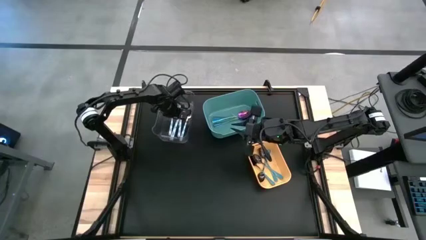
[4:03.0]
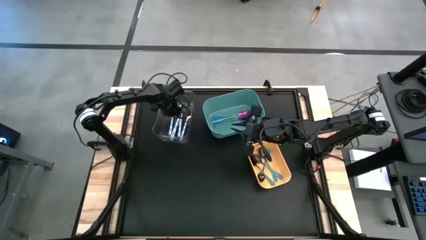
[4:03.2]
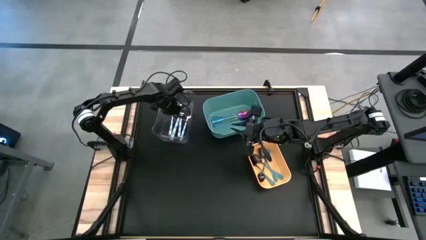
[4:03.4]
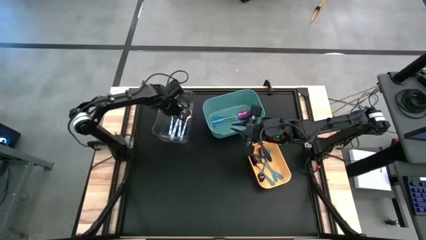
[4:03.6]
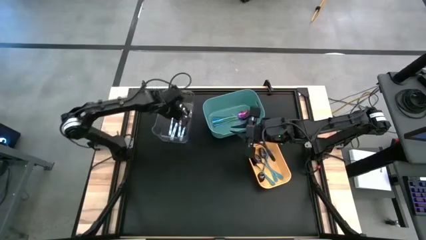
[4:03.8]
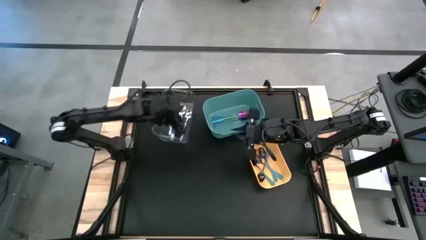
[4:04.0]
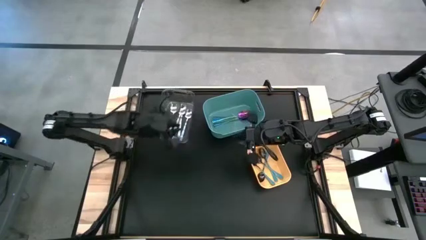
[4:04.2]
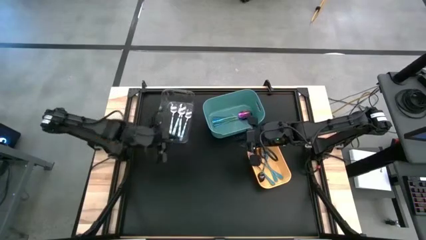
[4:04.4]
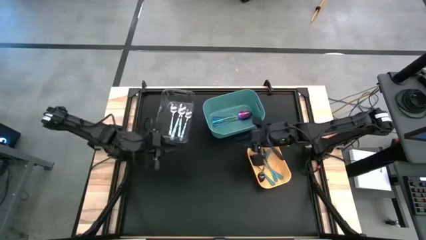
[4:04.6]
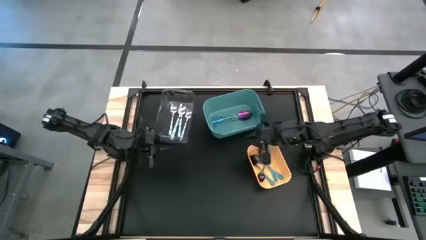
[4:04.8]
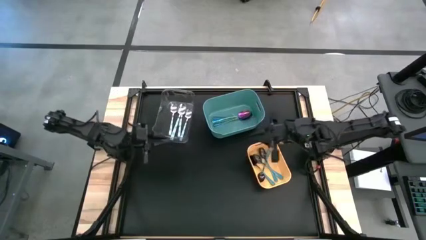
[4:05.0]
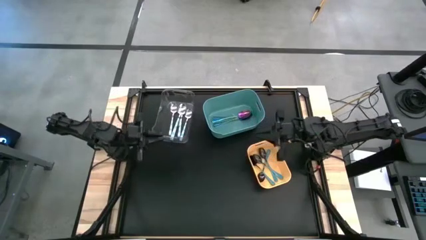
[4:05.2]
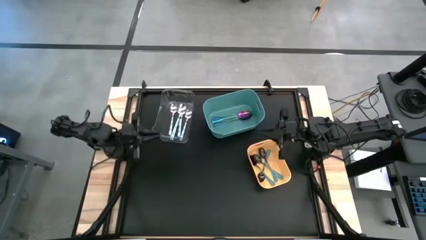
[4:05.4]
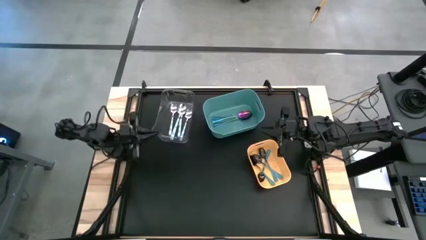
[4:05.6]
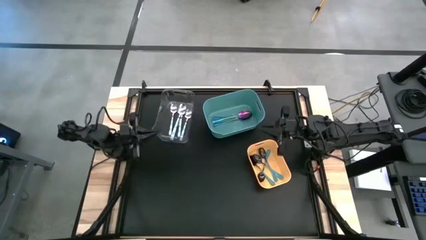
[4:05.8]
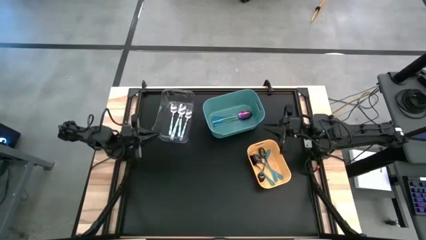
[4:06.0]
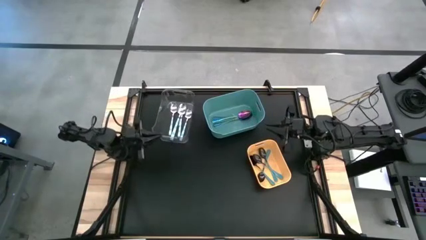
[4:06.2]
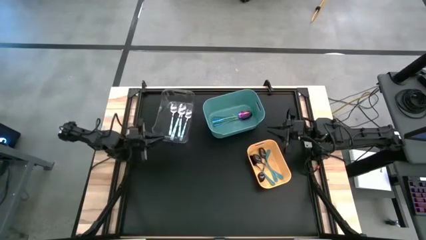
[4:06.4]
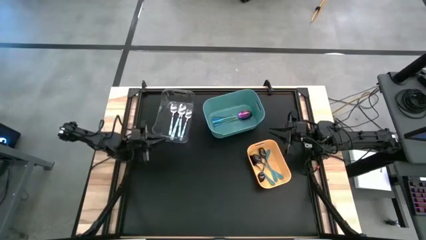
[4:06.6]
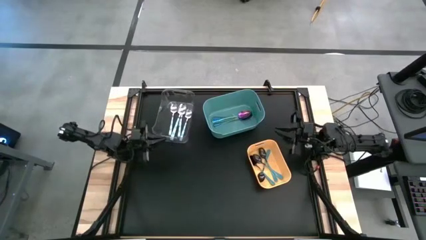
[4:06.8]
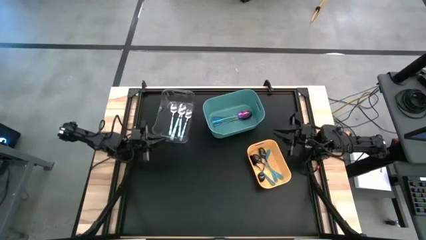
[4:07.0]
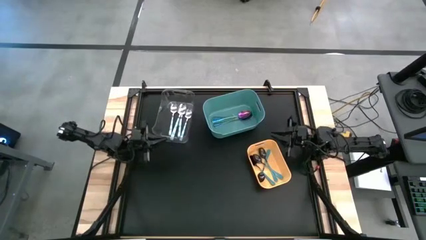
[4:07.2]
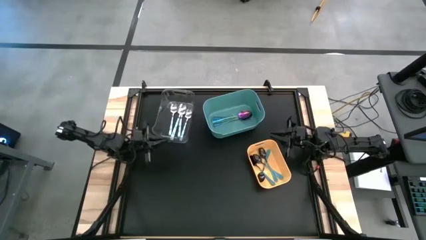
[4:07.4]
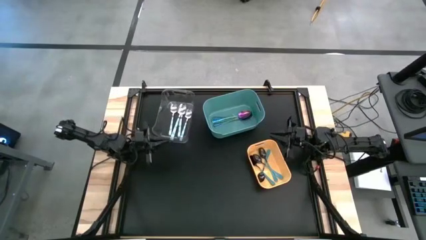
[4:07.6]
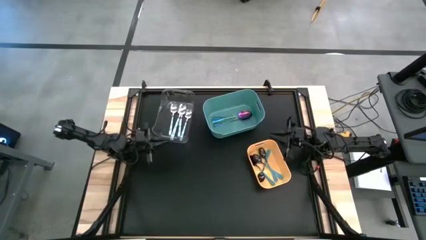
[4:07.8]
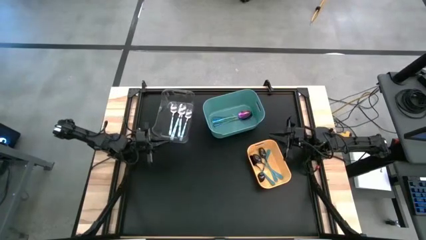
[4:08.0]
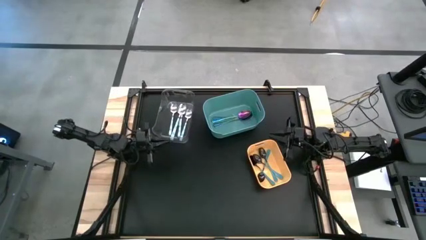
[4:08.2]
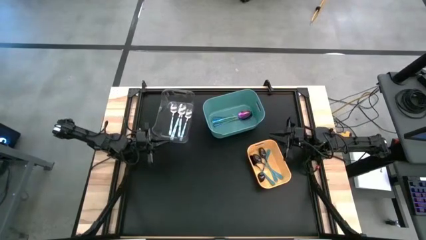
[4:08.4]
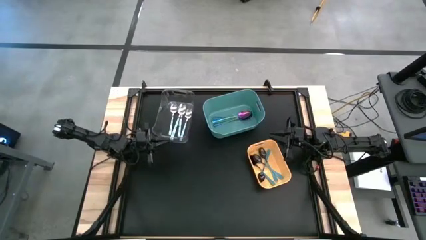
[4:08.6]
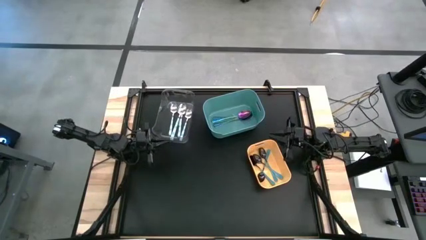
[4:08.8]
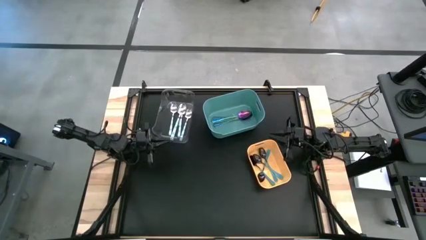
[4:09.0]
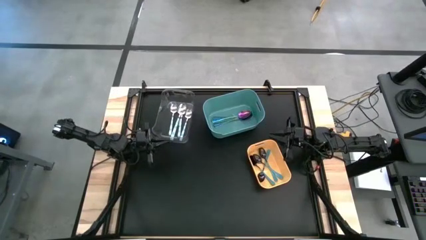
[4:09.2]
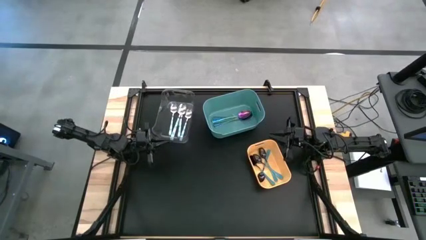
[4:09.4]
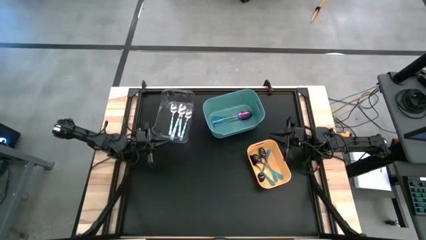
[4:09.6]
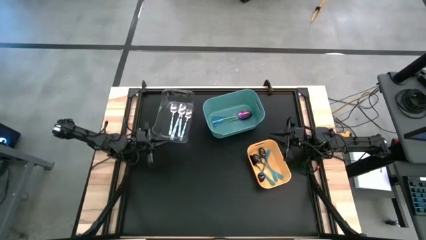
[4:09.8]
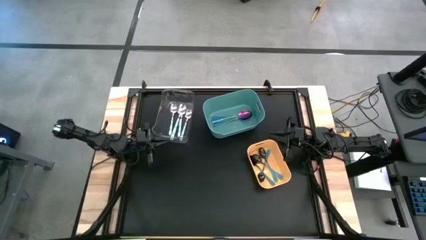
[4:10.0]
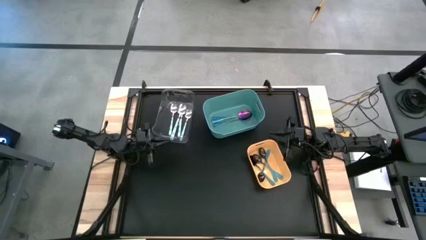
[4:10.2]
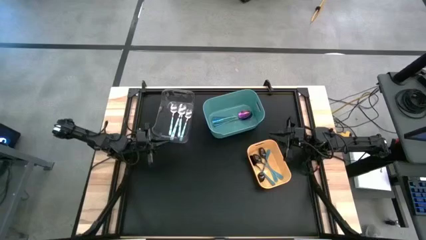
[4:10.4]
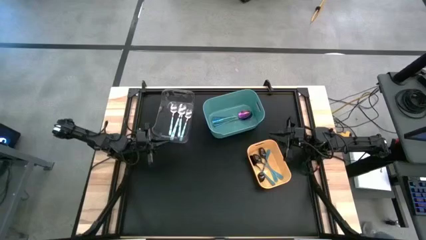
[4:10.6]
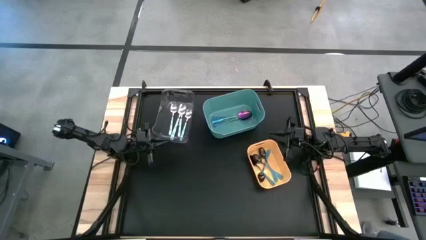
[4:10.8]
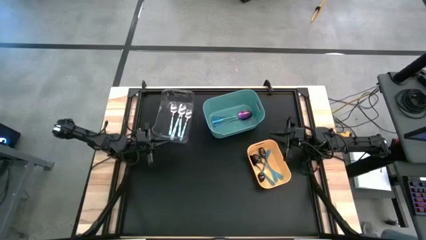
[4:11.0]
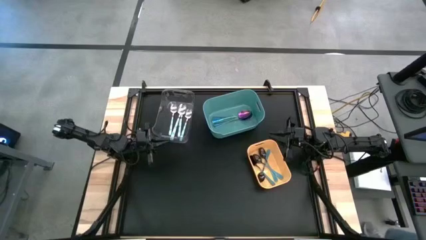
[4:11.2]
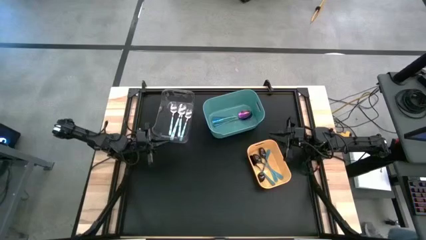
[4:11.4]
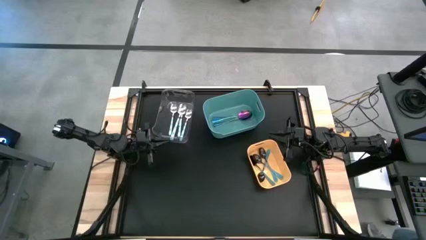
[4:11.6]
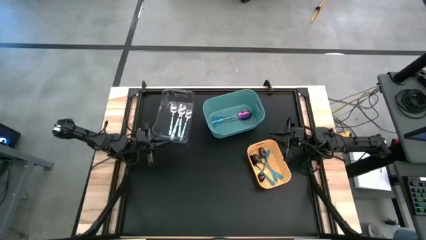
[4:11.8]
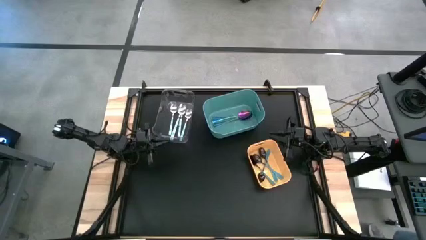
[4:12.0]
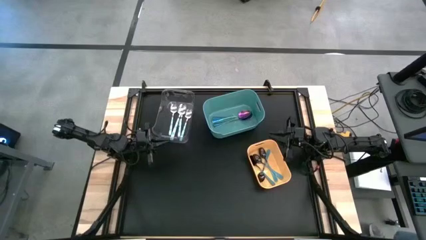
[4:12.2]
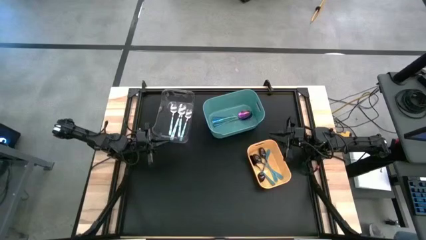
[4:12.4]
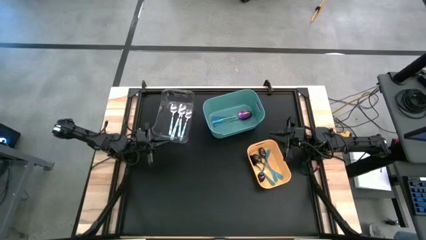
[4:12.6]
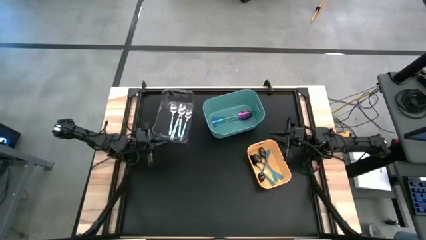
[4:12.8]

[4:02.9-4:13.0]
Task: Sort silverware by color (type)
Return to Home Position

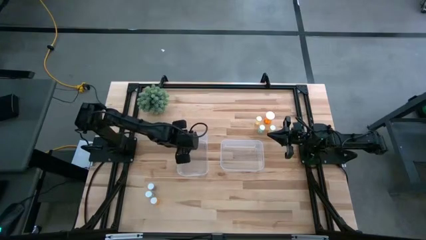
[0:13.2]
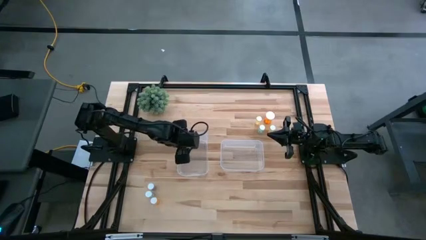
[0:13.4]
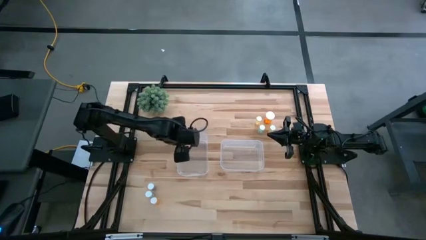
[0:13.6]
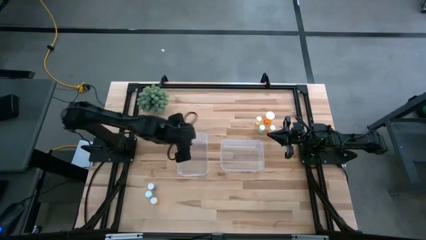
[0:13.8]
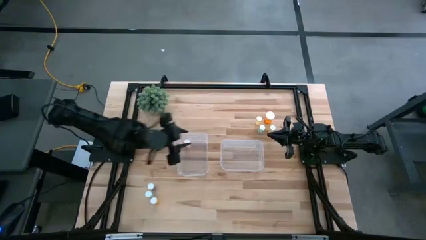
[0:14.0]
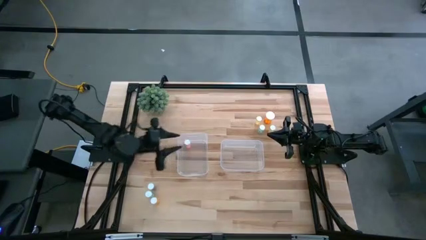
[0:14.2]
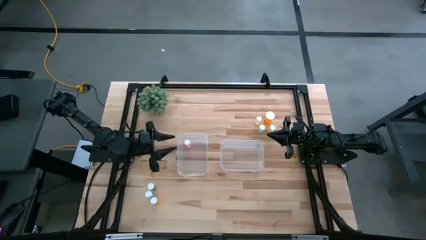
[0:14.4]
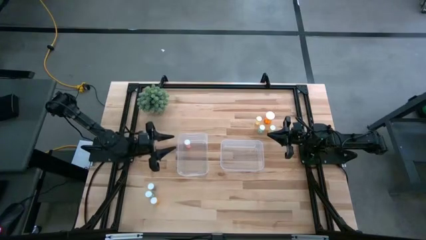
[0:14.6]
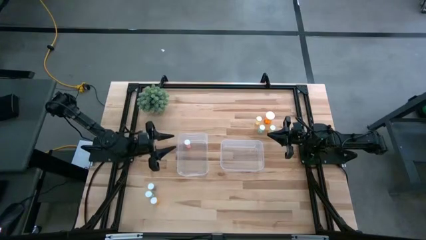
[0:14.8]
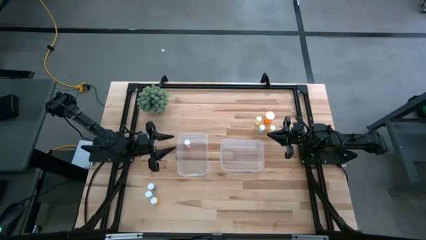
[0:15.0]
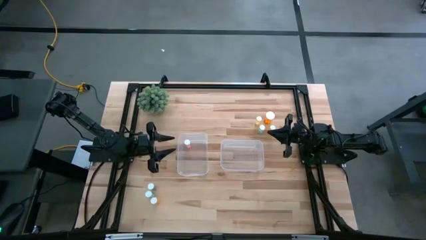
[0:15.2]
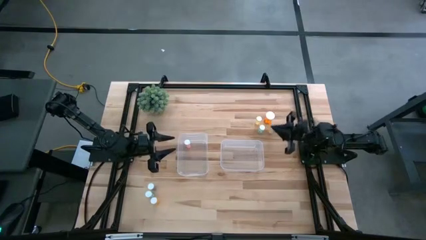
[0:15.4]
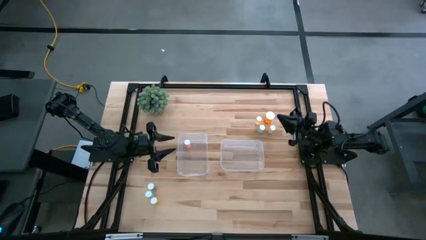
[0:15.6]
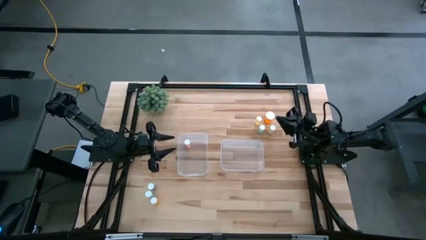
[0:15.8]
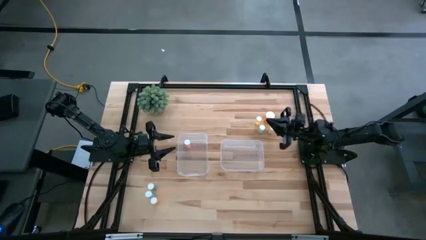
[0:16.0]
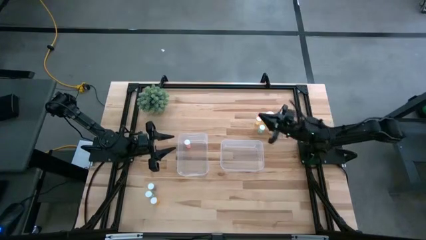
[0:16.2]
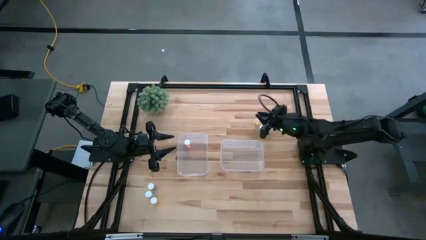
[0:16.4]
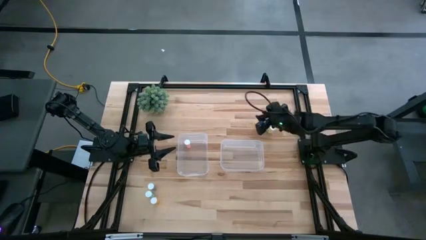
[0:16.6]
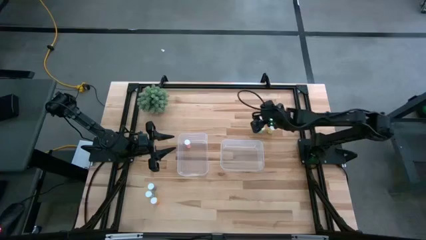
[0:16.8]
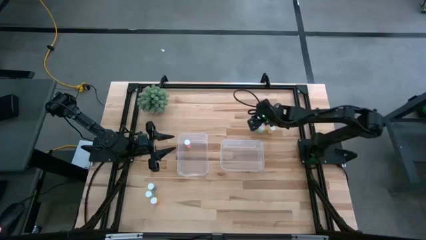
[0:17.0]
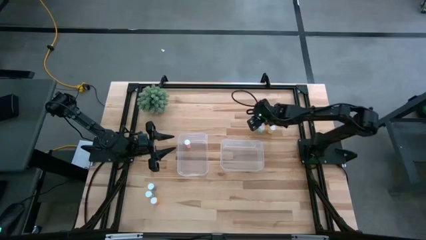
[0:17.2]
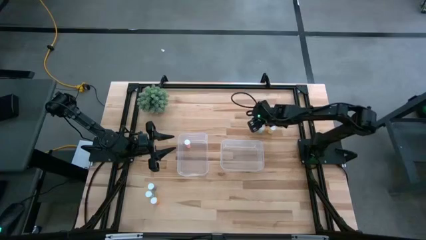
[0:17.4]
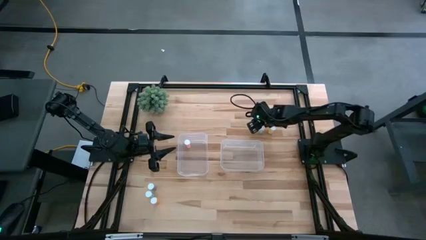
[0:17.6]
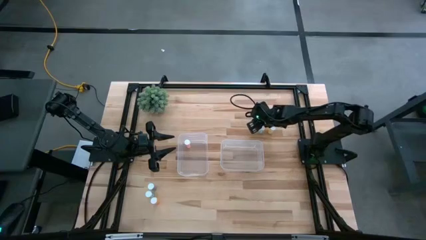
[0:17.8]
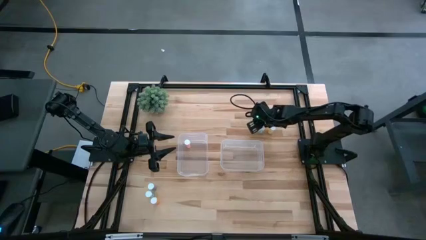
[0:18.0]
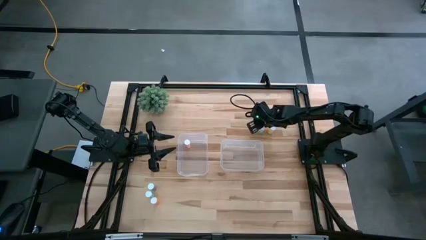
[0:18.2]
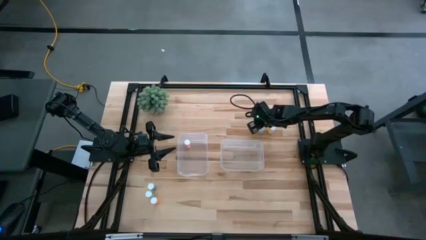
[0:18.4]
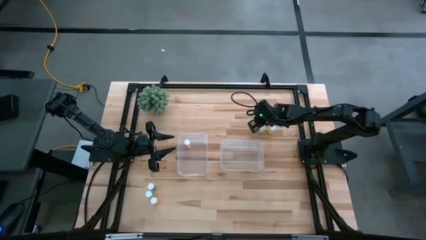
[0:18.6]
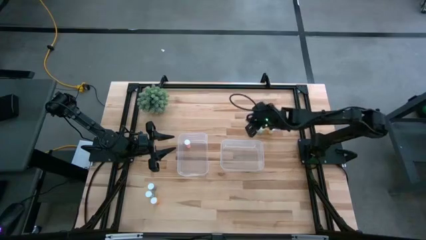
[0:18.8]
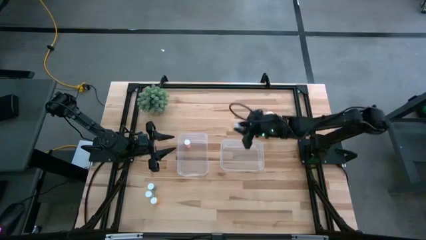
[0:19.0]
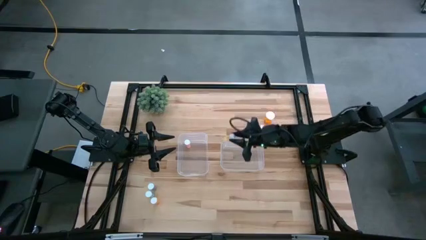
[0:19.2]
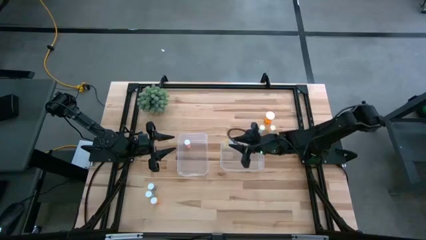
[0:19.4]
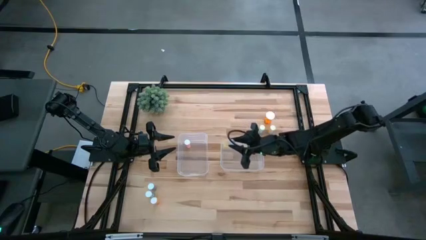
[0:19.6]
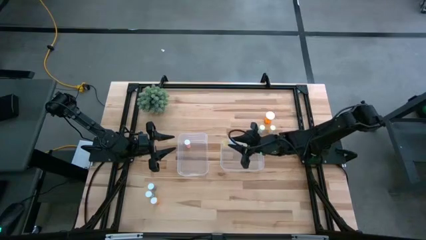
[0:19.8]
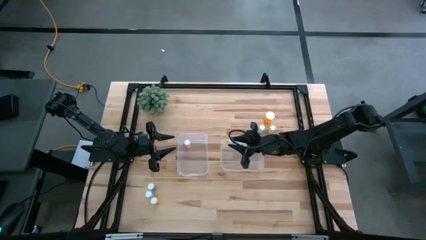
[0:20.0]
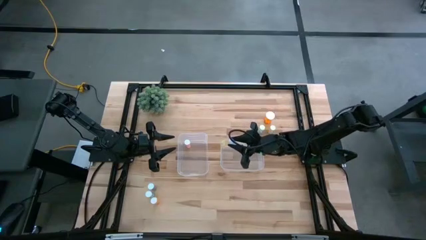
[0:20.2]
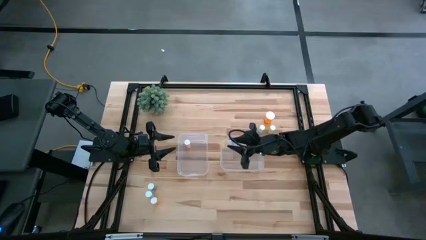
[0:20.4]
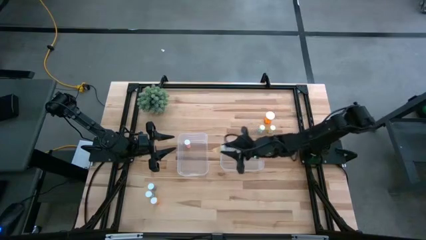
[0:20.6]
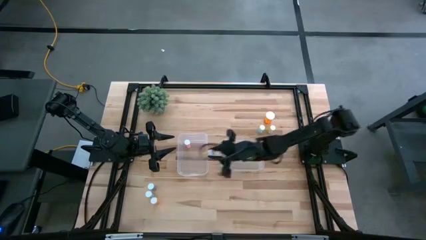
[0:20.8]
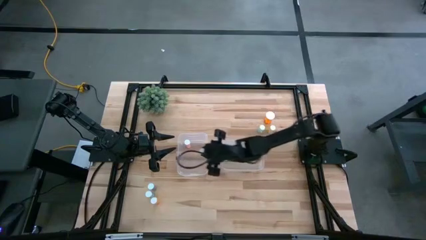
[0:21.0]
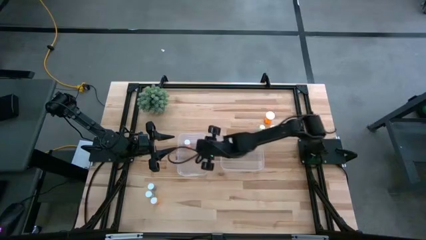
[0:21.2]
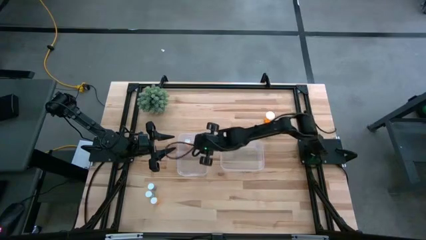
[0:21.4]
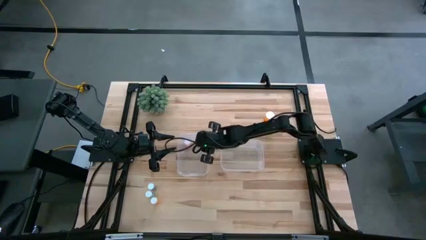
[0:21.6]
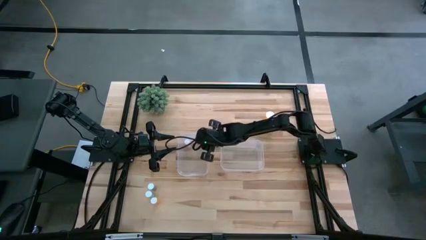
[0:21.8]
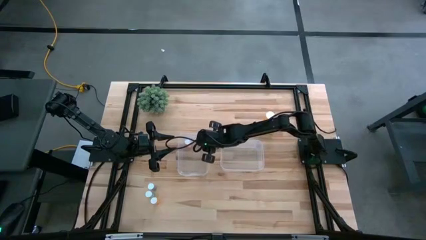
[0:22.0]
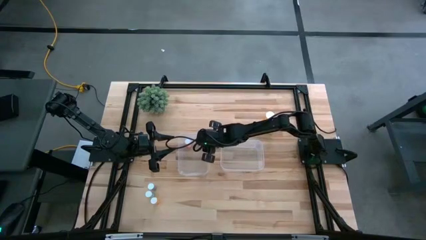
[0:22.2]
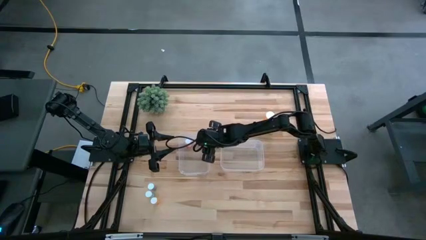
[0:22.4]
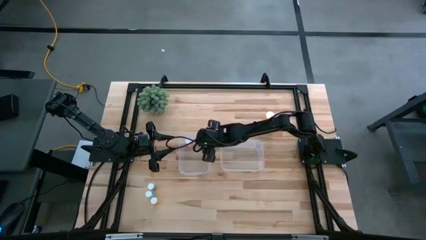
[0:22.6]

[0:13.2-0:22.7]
Task: Pick and place medicine bottles into bin by pill shape (circle, oval)
Put the top yellow tablet bottle into the left transparent bin
